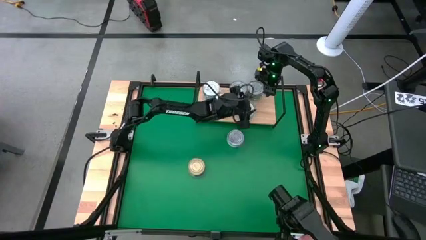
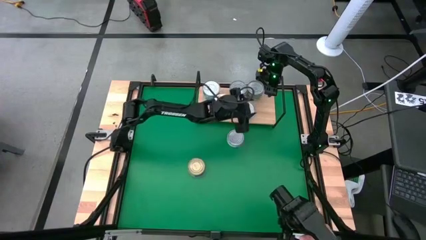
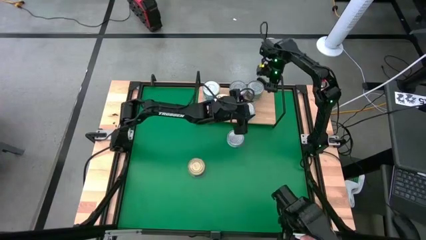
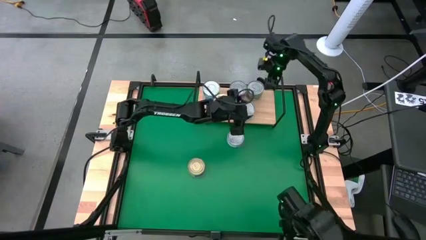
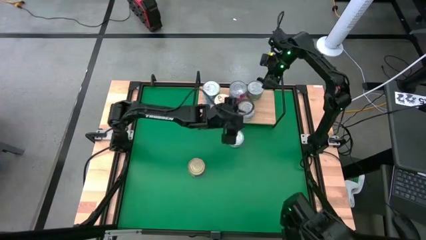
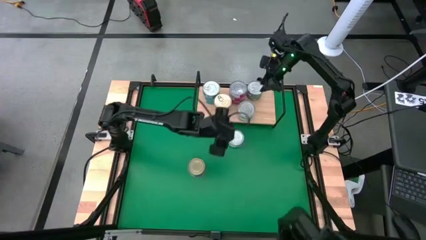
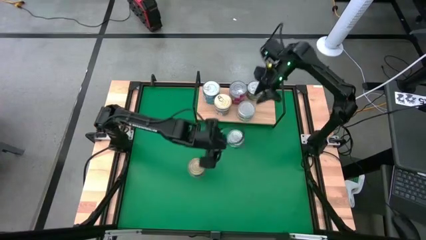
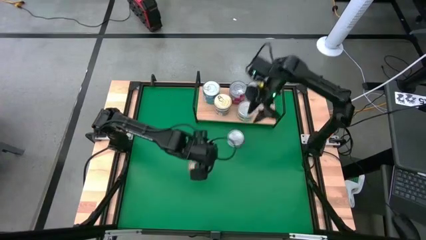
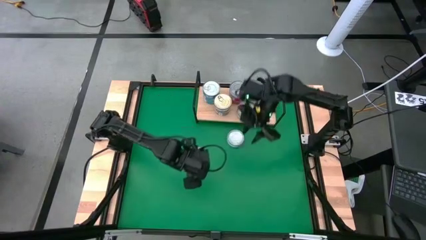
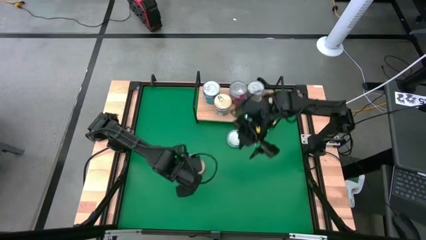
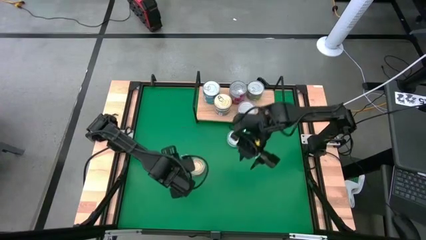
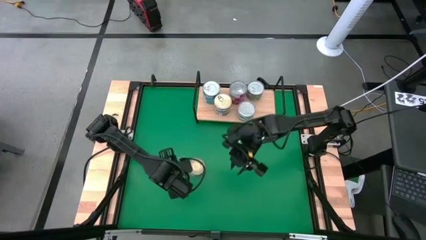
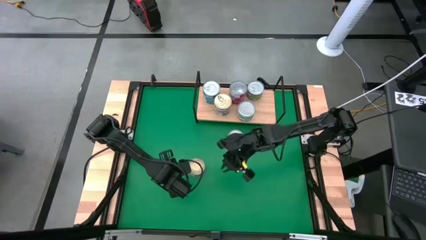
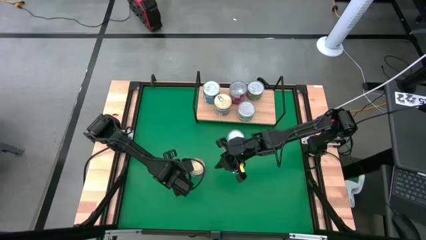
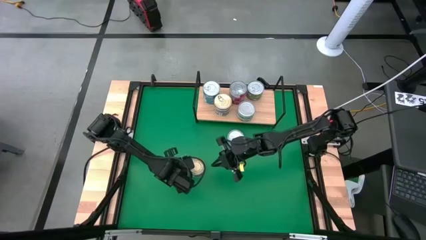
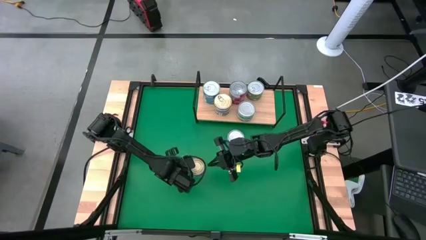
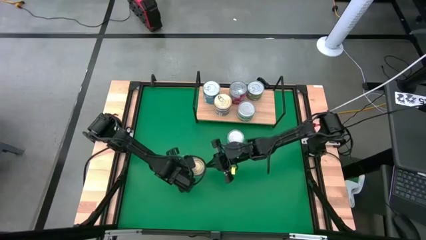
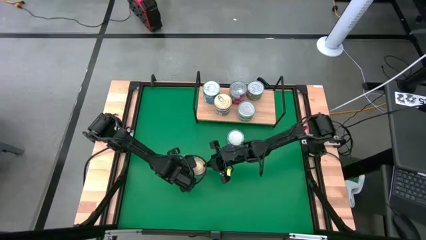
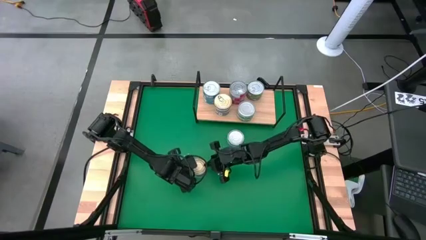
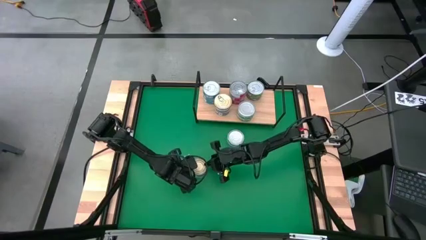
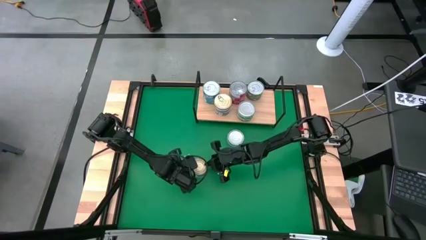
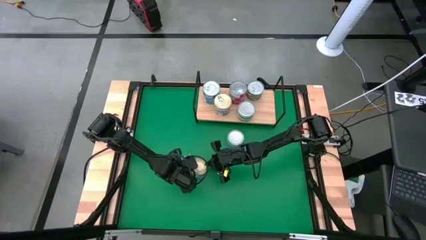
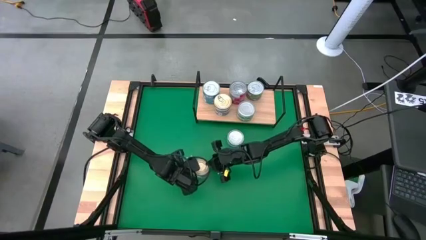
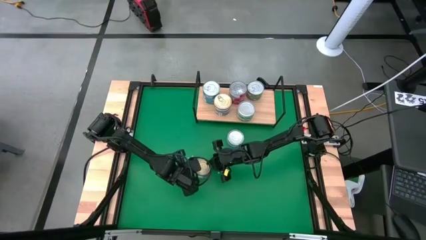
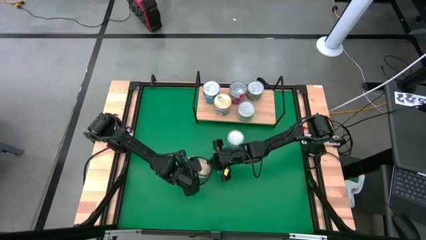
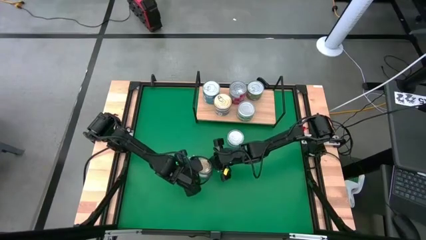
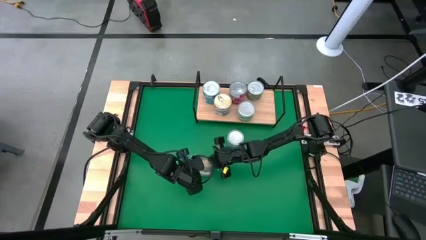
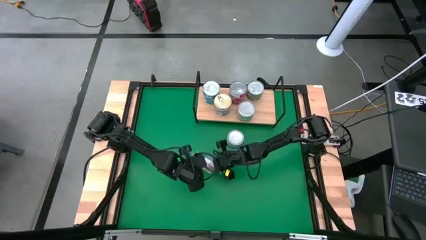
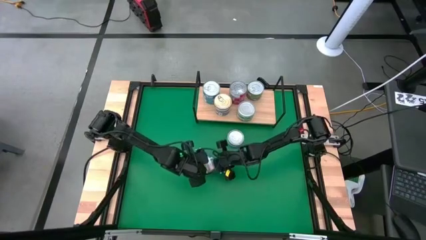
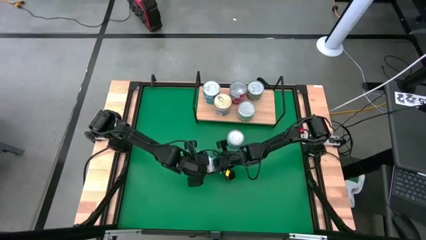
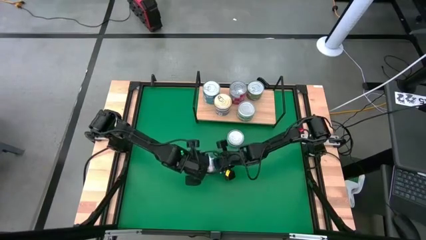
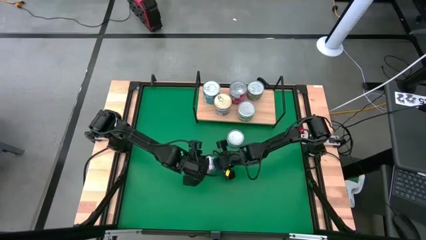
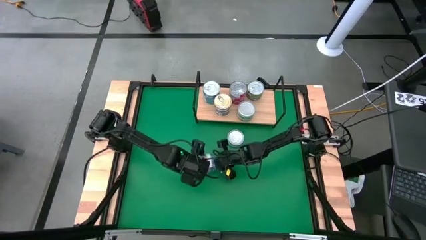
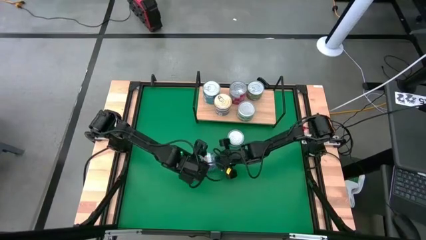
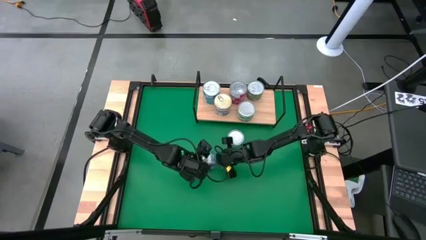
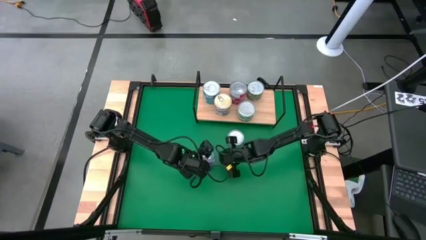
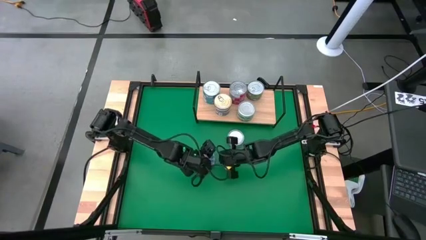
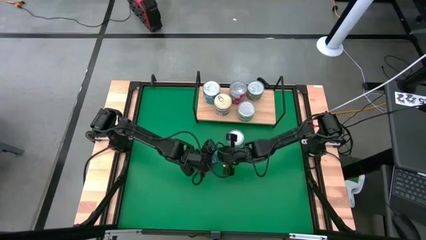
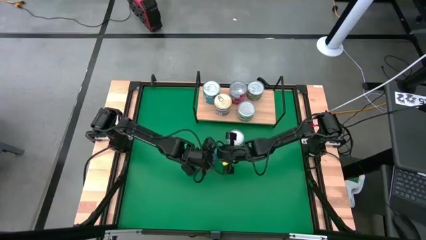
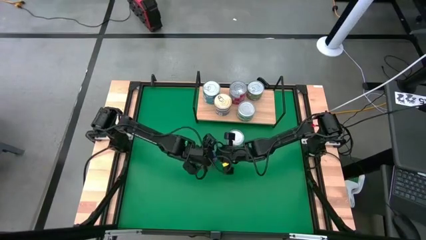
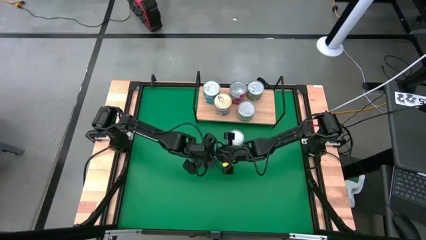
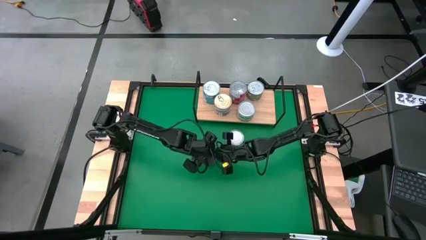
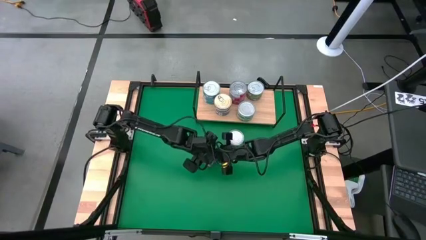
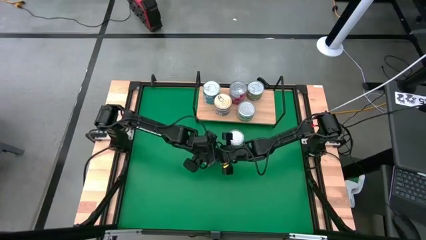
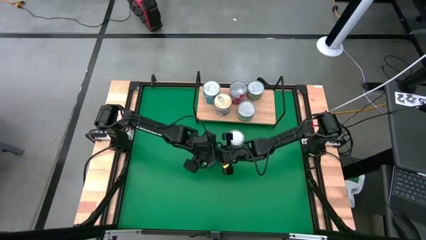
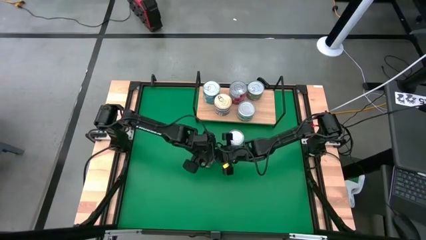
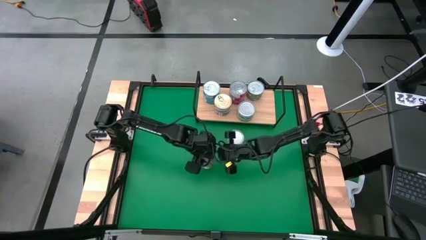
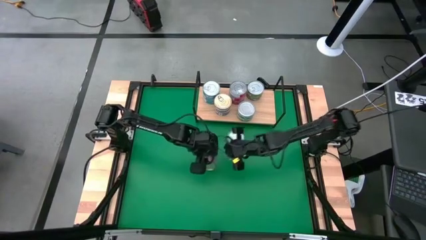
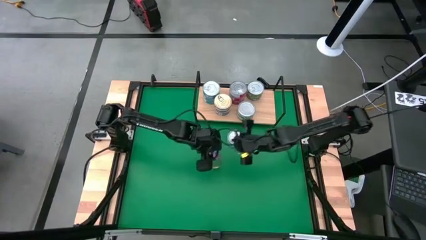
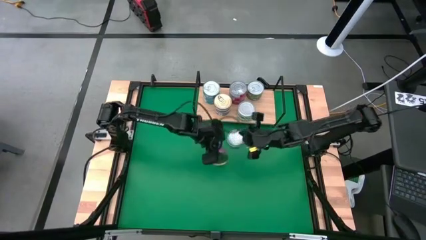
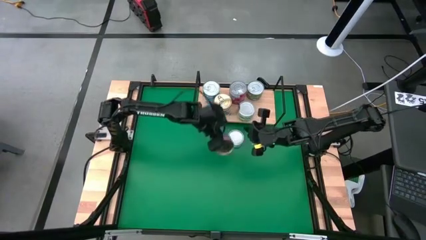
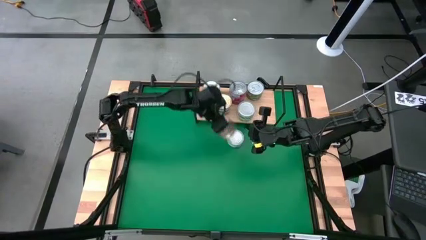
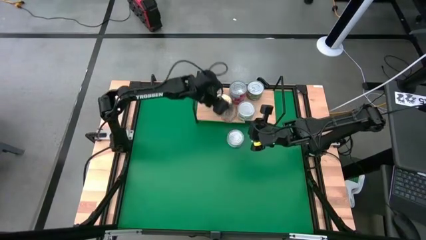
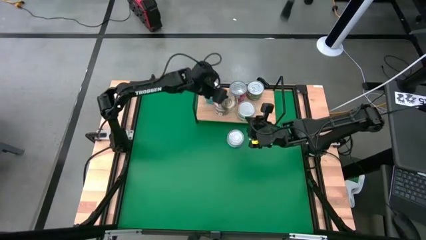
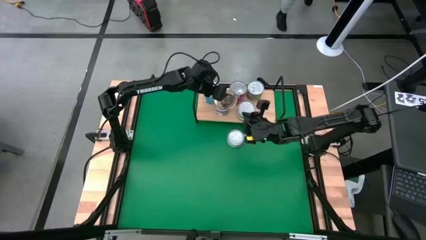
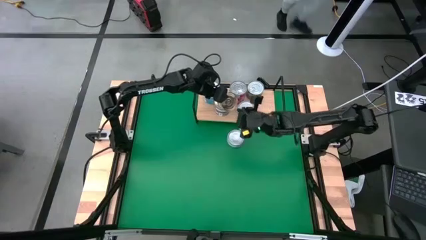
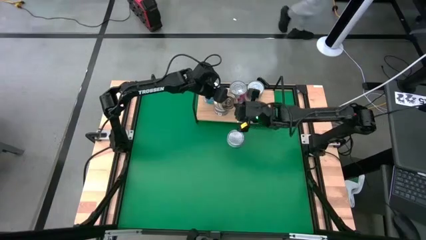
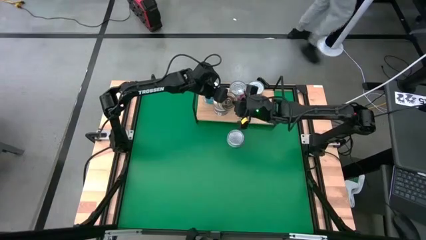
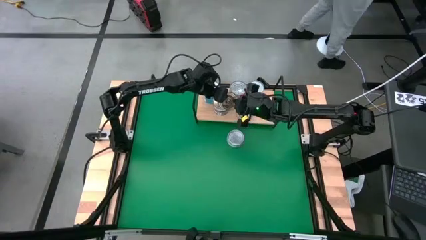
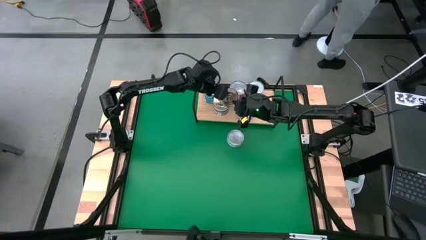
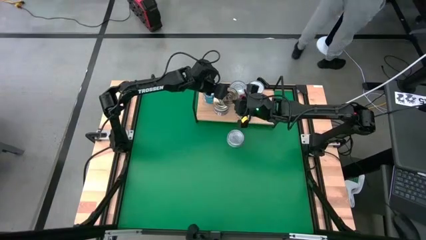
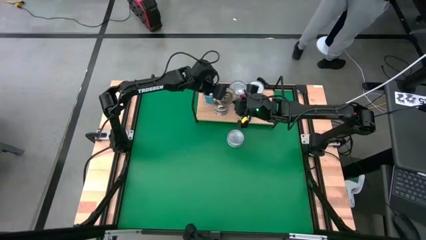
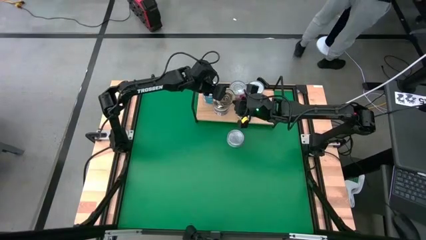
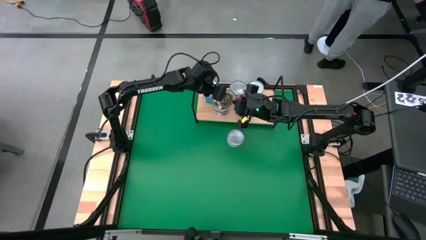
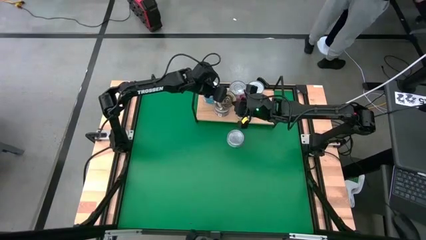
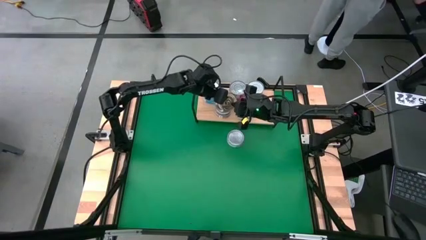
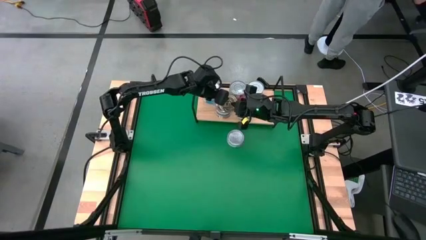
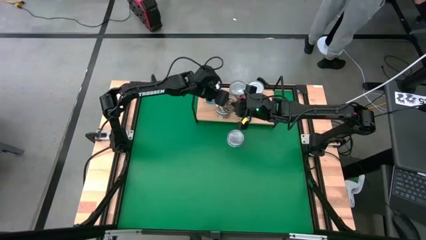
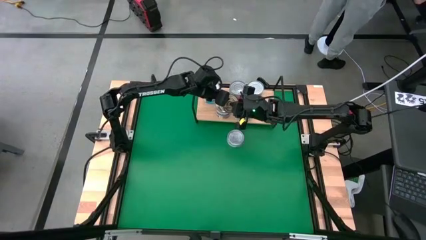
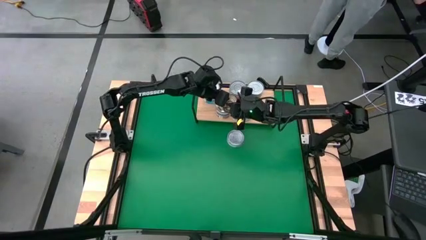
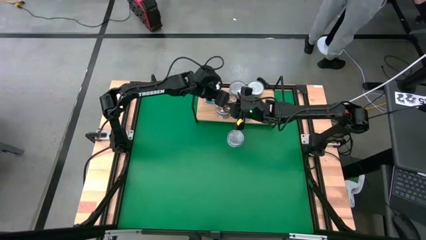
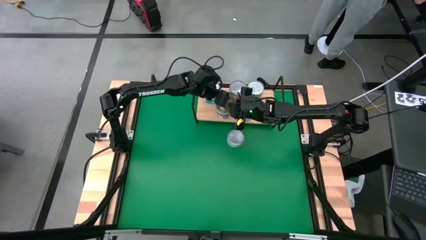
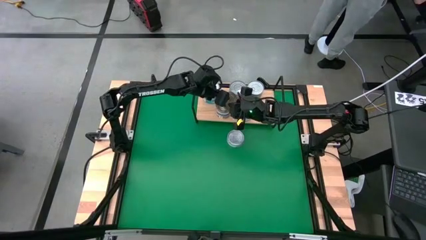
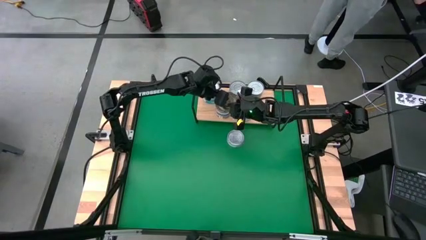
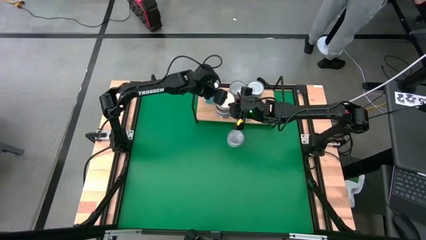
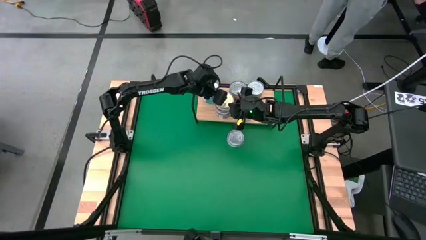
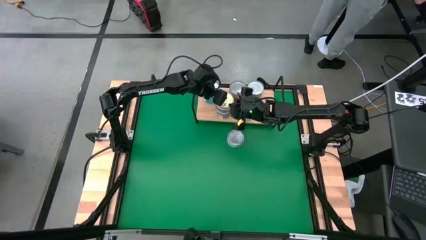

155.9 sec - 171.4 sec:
Task: Stack canned seafood by type on shelf
Stack the blue pink tuna can on top of the blue pink tuna cans on the shelf

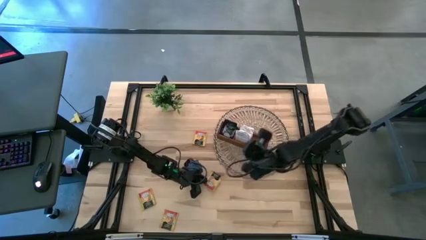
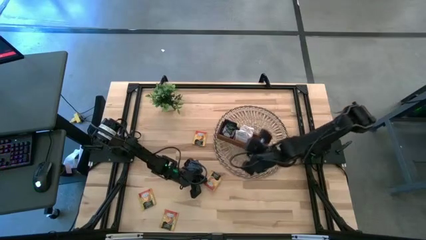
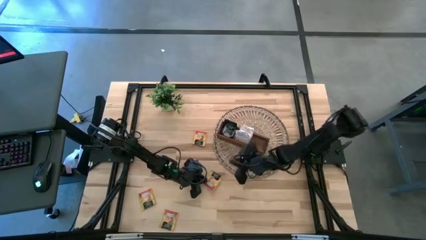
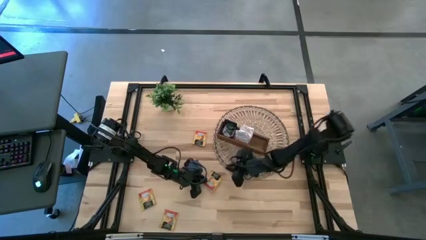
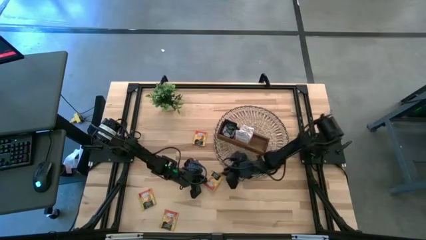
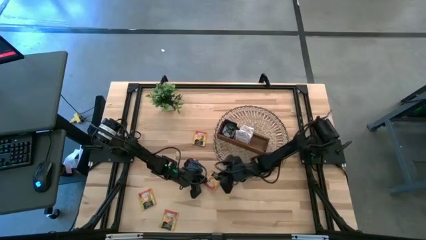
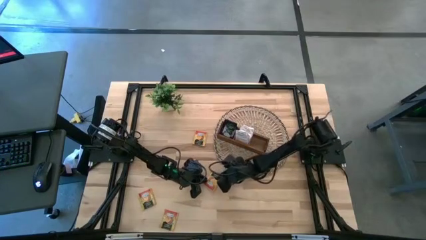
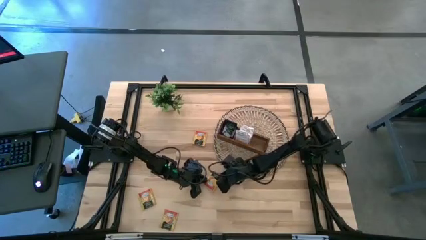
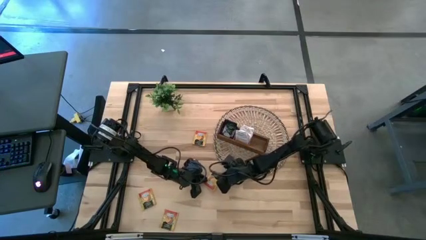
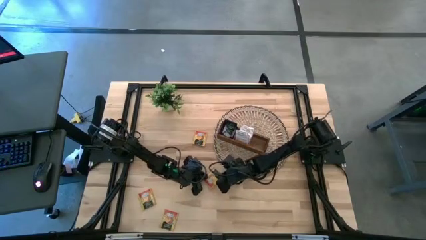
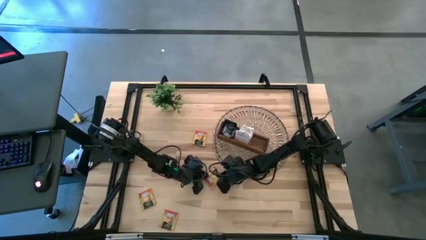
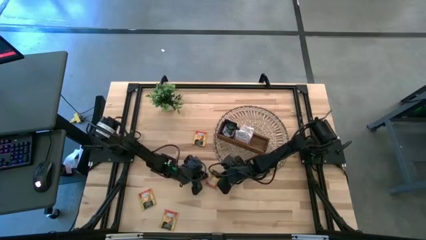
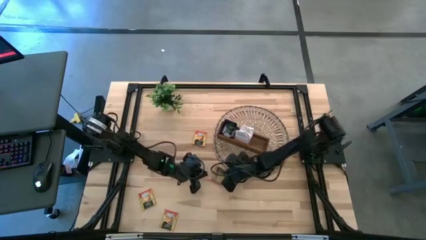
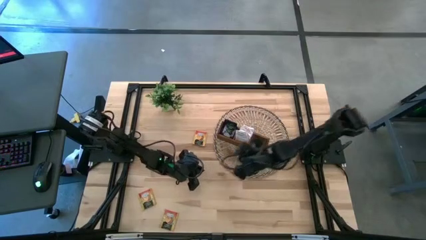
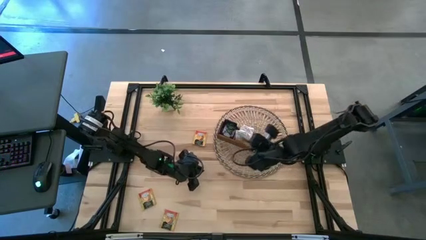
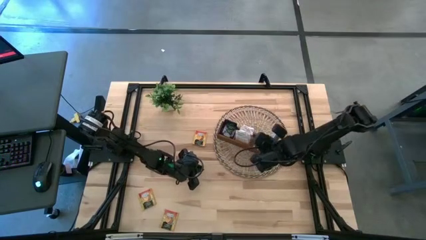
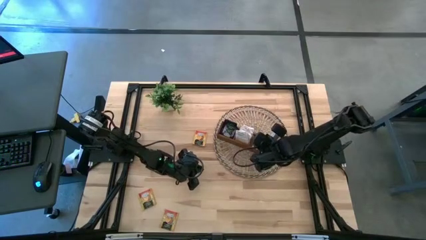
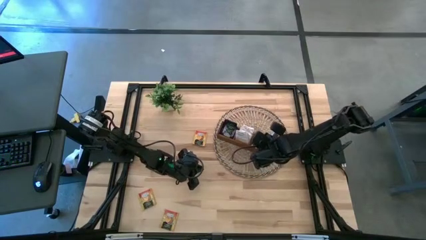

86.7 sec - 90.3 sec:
Task: Pick & Place Tea
Put the orange tea bag into the right section of the wooden organizer
